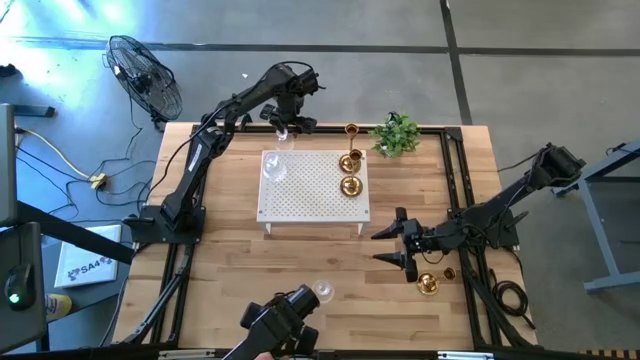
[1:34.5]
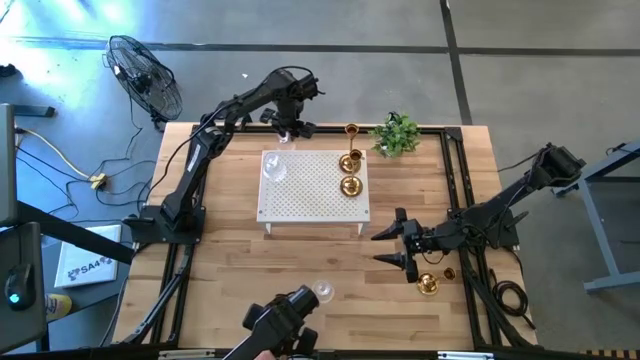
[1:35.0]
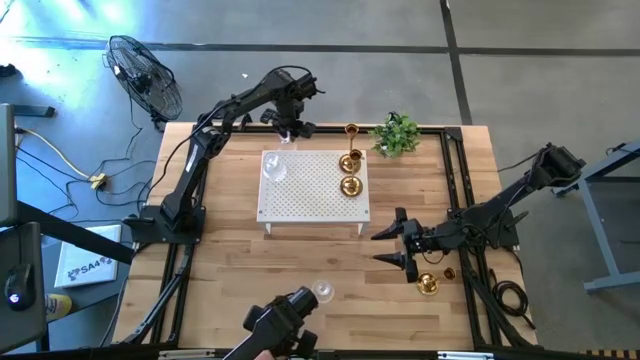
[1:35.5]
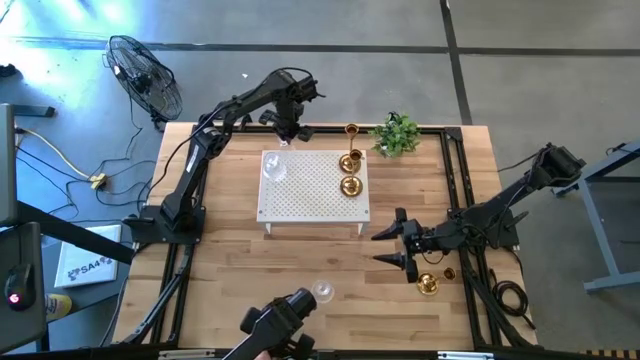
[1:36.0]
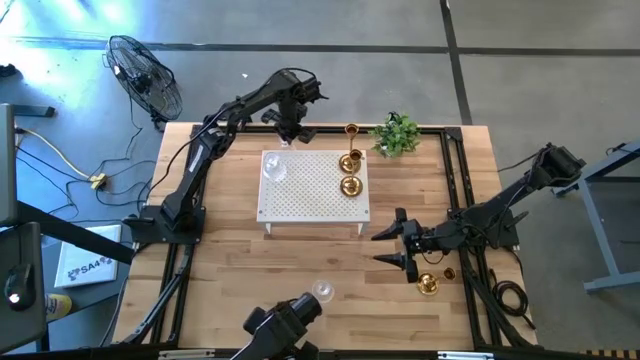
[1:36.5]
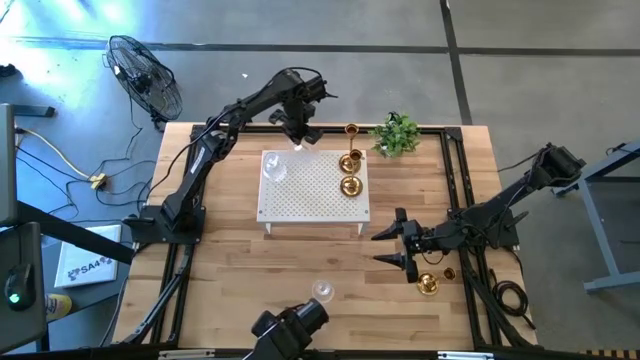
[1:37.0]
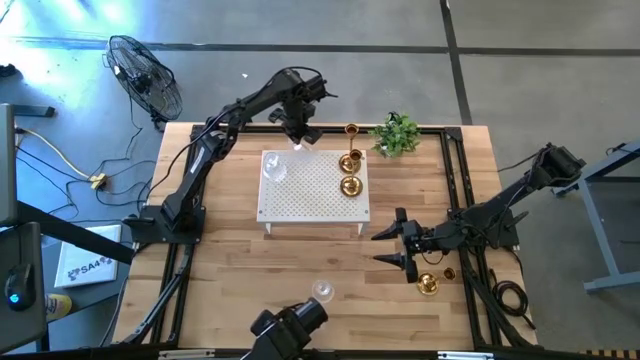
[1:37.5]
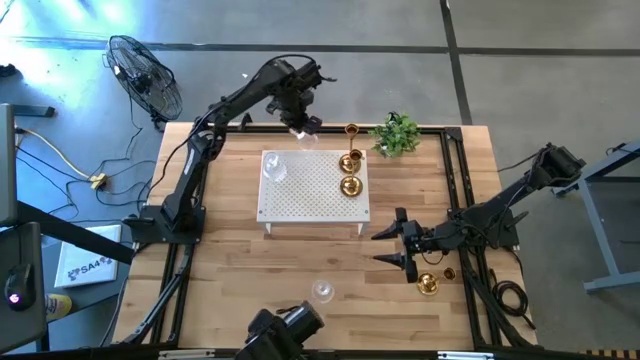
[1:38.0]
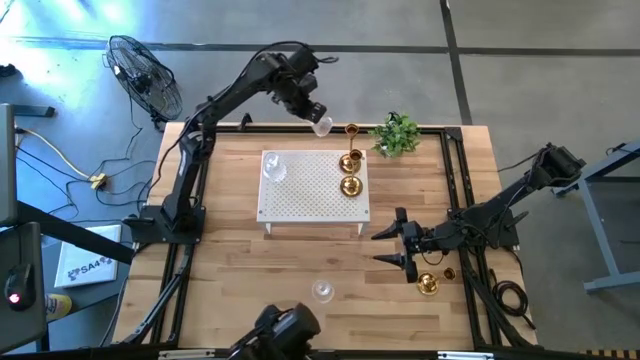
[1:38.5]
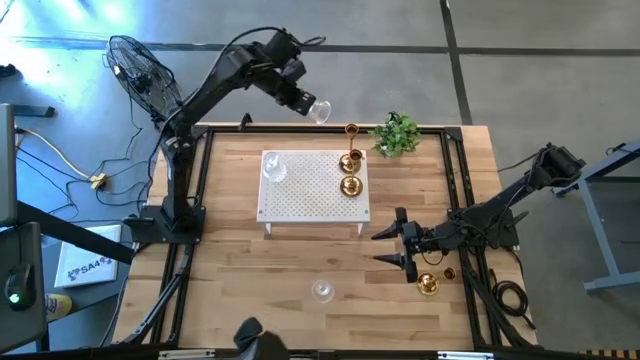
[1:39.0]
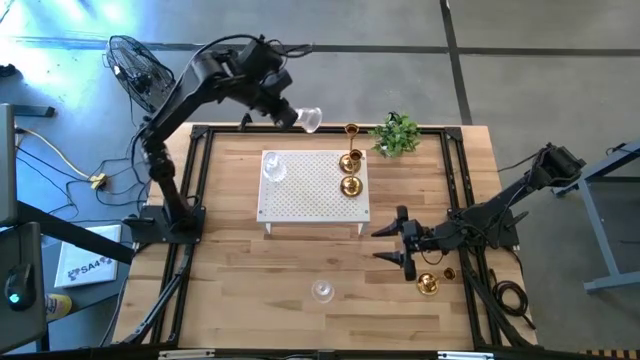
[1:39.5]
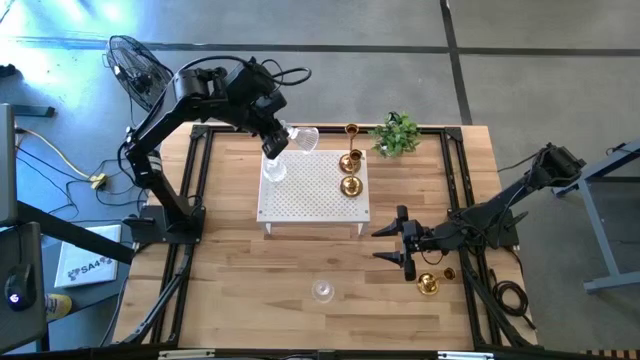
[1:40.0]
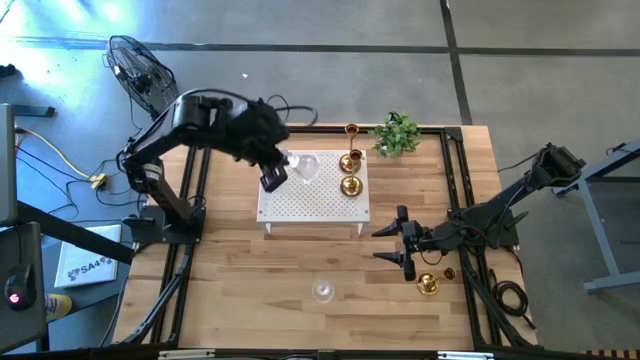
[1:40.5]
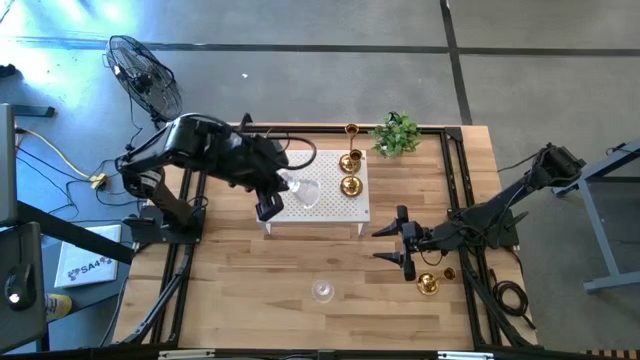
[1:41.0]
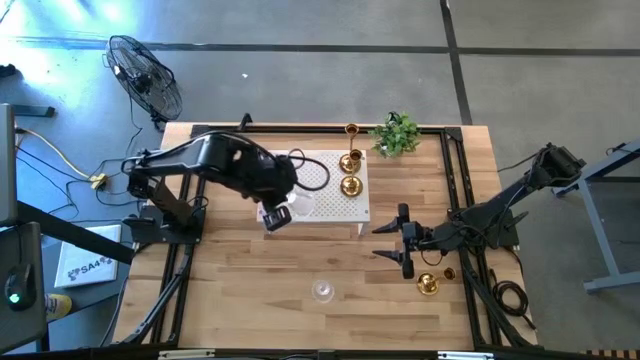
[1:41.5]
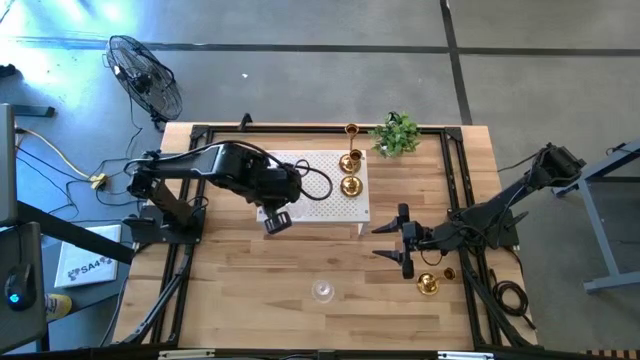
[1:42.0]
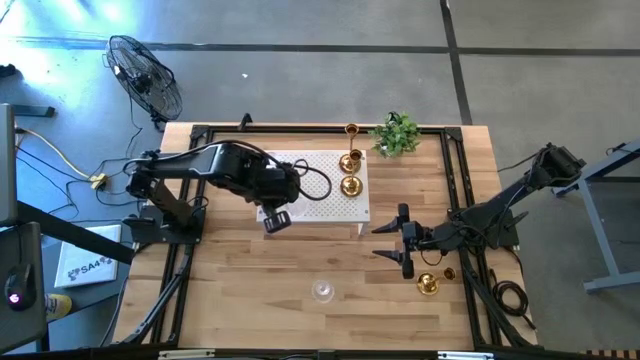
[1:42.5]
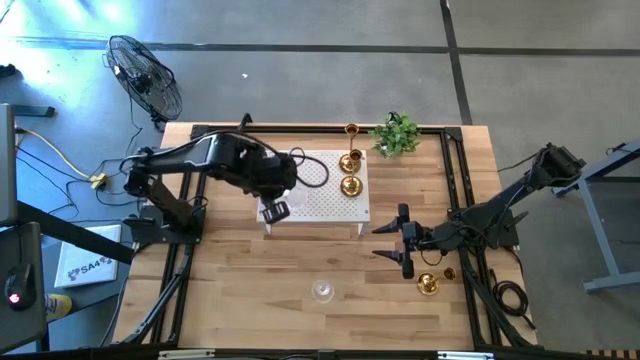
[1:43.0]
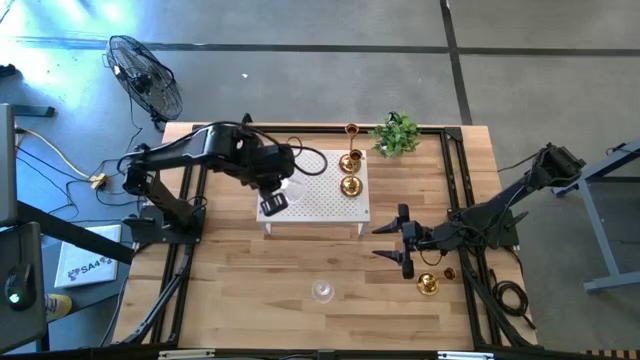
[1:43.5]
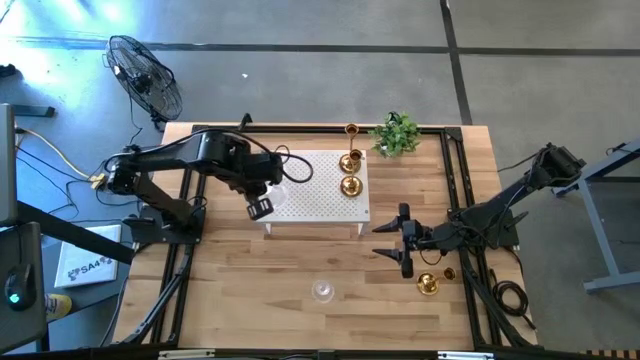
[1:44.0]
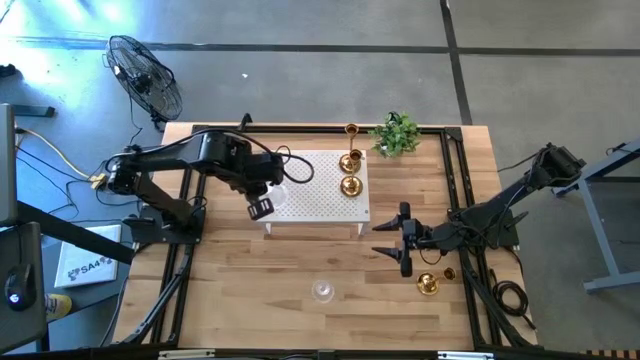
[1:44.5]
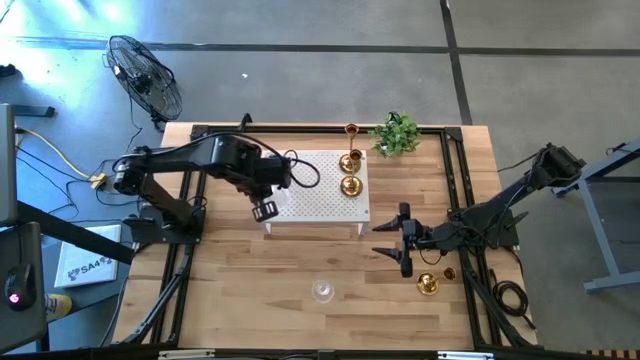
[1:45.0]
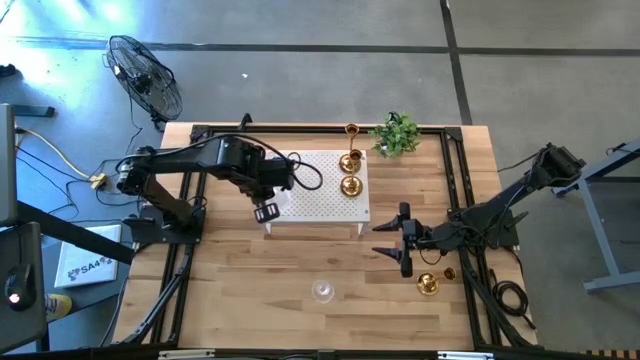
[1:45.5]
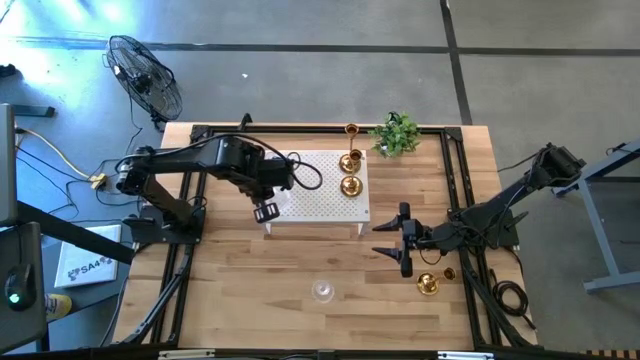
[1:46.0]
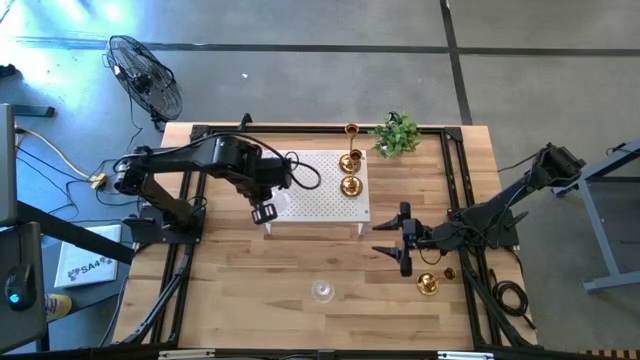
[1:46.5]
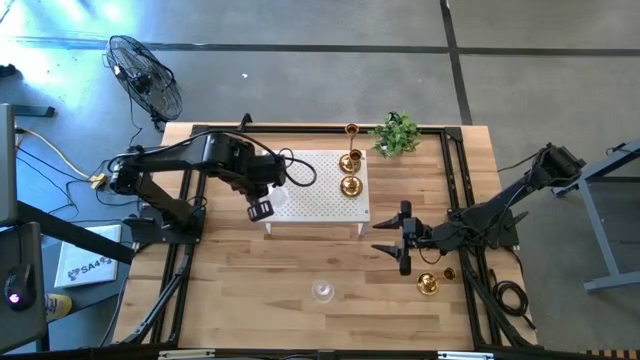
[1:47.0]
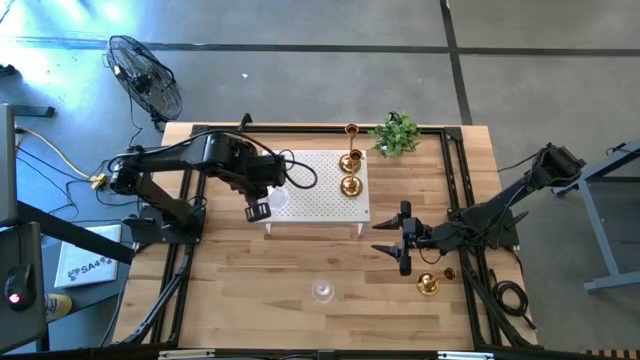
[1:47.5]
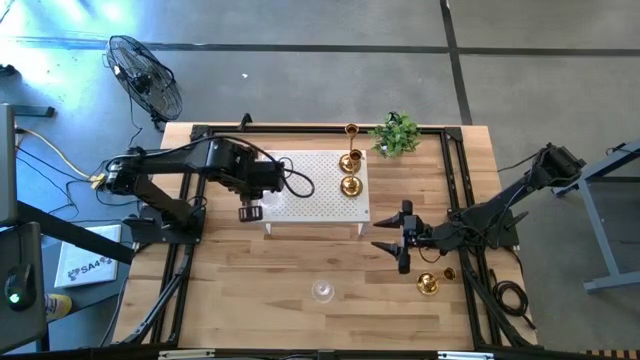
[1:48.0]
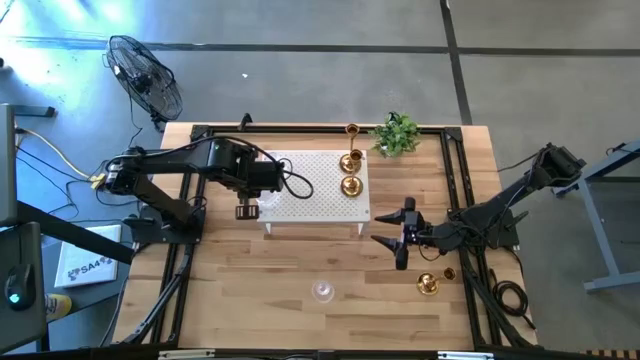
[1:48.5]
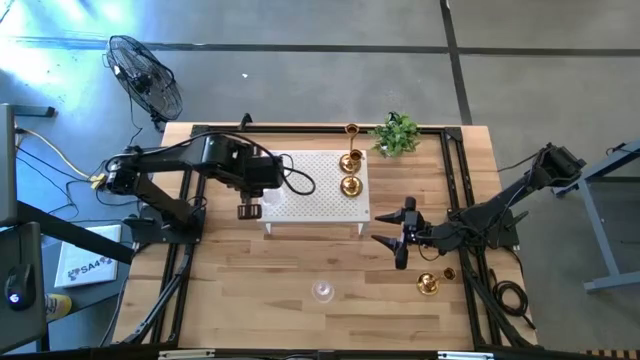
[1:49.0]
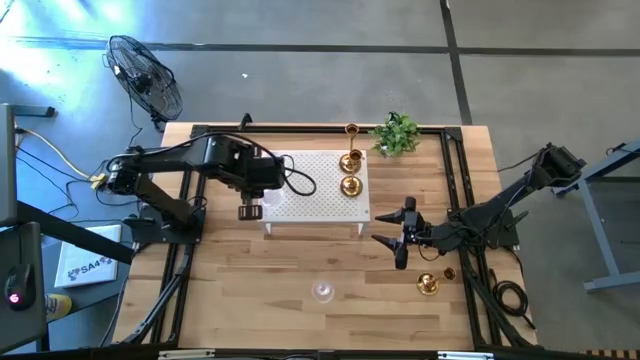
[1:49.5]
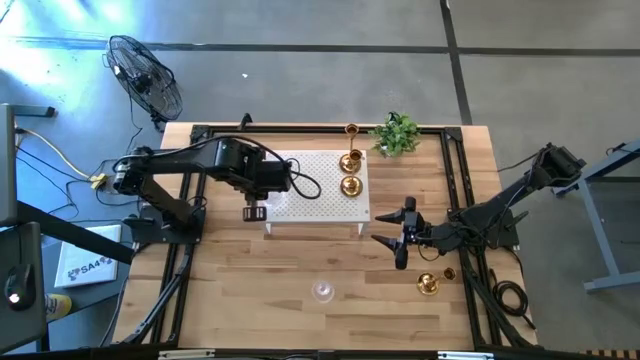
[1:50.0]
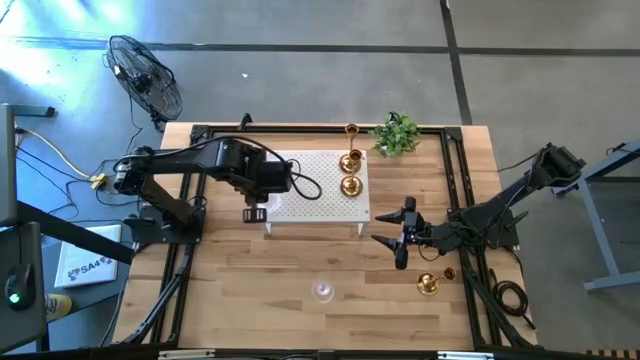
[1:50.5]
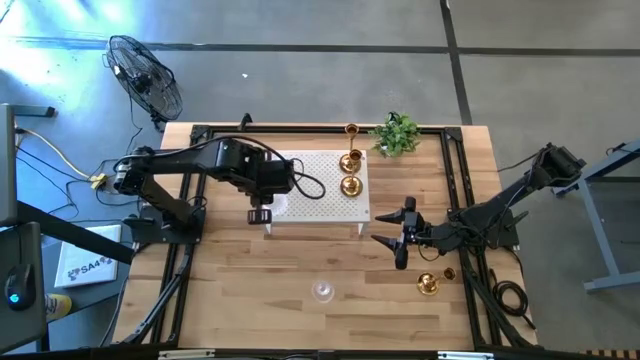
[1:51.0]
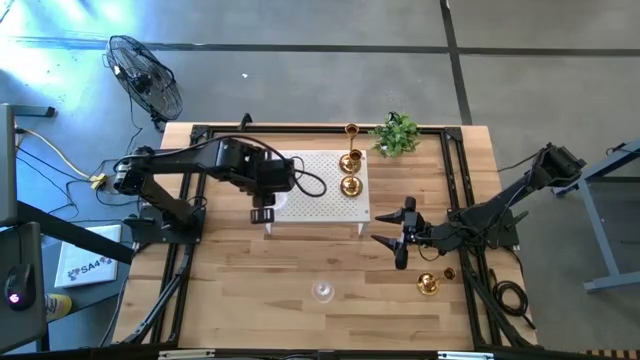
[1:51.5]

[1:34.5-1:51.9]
Task: Pick & Place candle stick holders
Put the top transparent glass candle holder on the shelf aligned with the other transparent glass candle holder

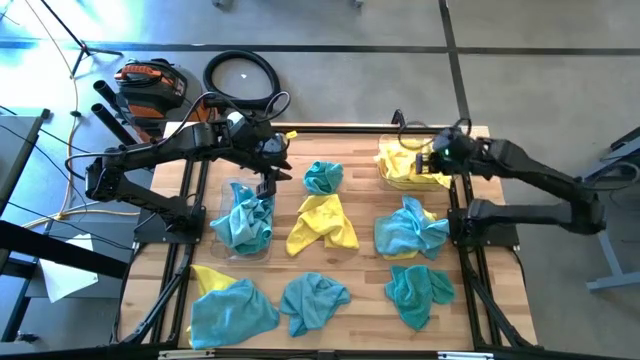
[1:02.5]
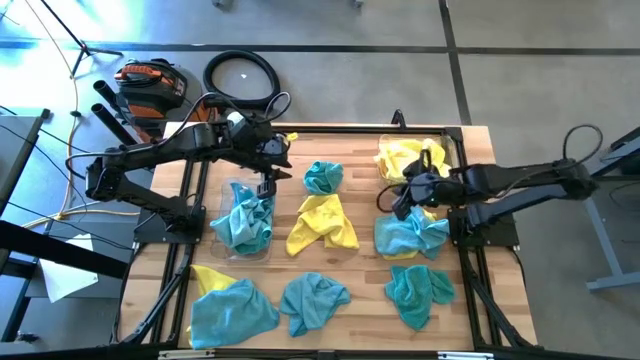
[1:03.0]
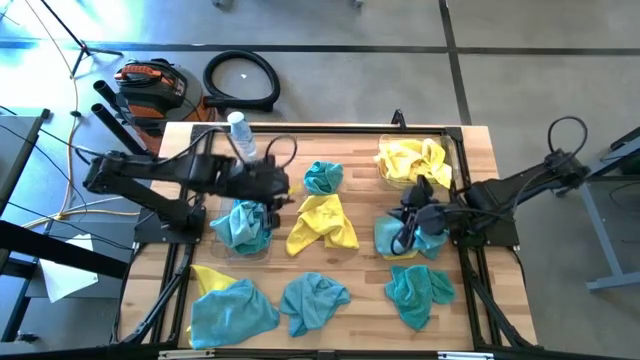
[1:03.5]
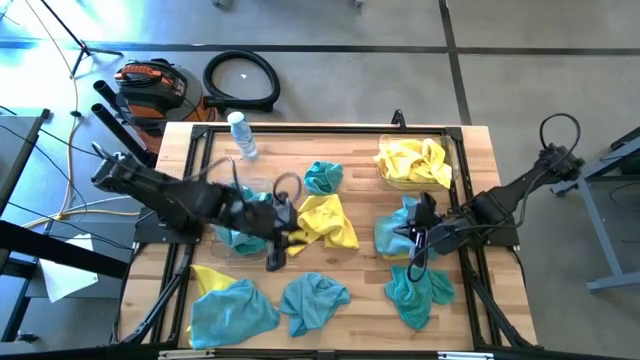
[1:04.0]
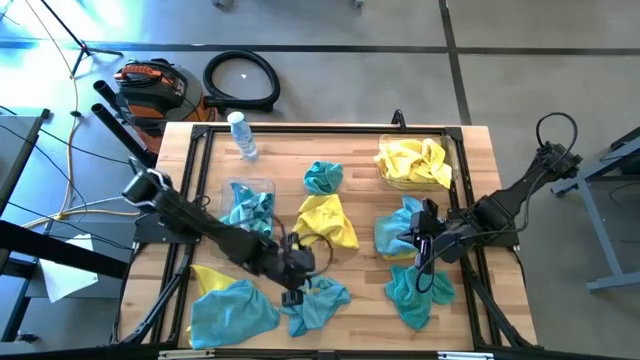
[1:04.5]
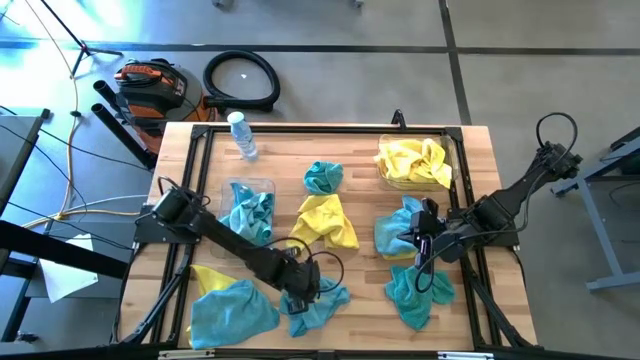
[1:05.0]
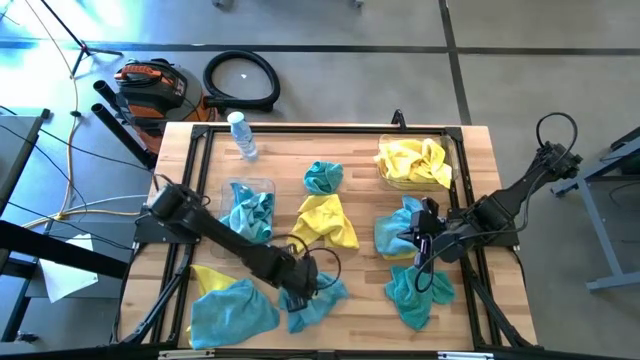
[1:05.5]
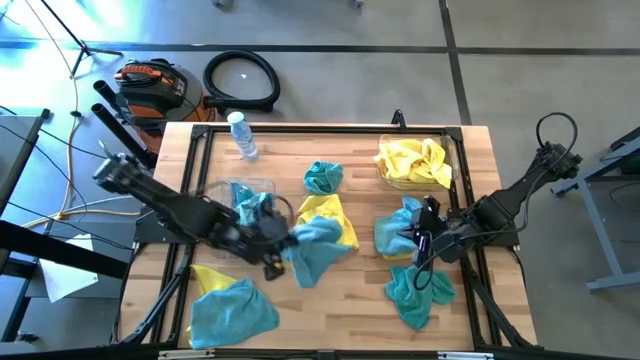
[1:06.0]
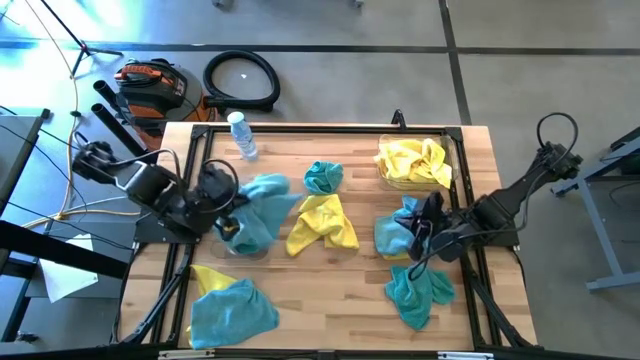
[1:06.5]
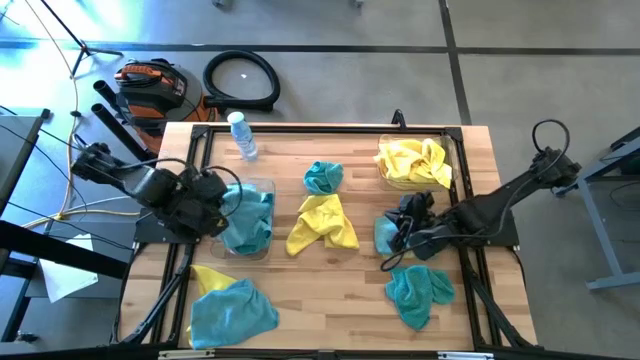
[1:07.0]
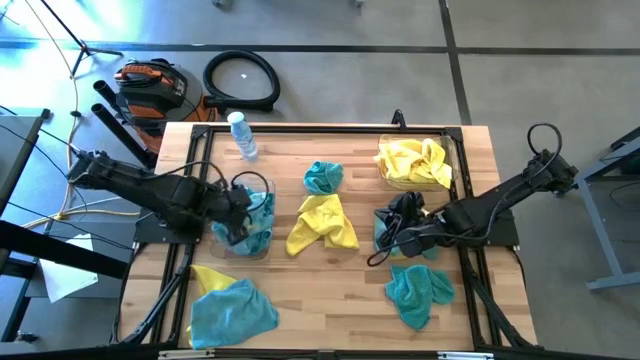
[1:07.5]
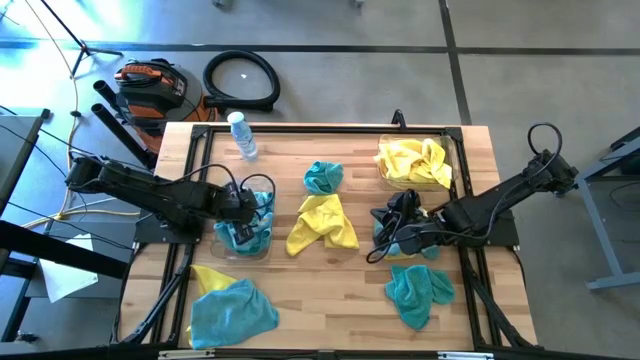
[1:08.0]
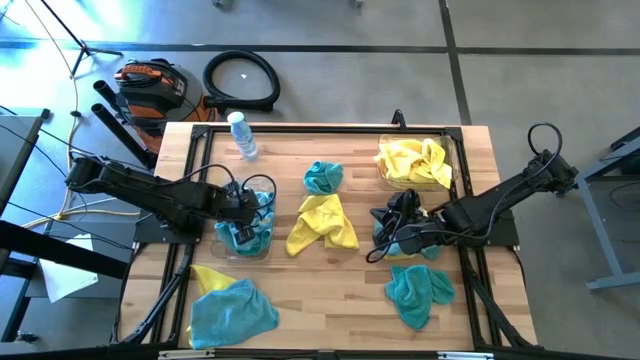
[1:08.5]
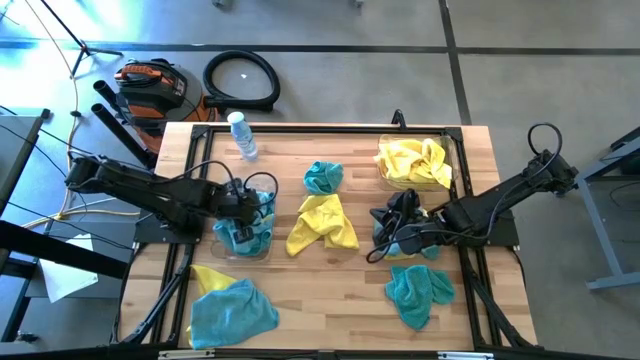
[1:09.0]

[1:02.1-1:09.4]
Task: Sort microfiber towel by color & place in baskets
Put the blue microfiber cloth into the left transparent bin
